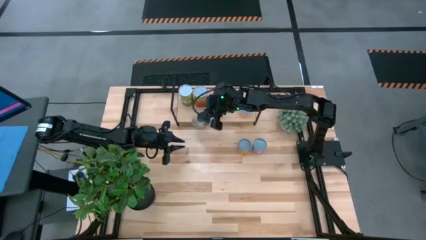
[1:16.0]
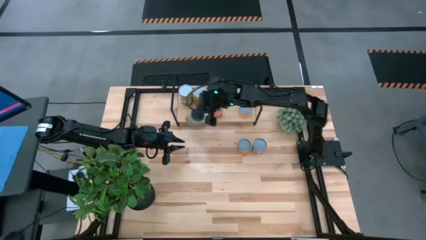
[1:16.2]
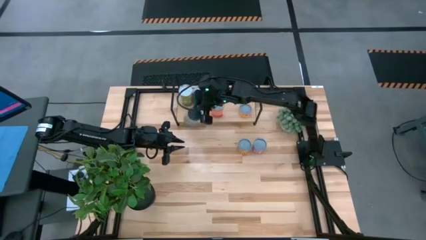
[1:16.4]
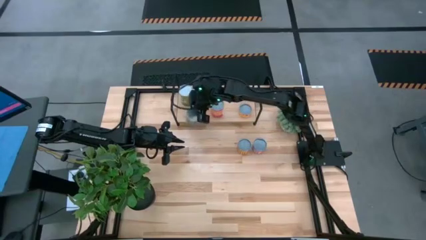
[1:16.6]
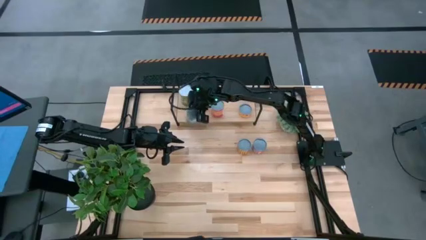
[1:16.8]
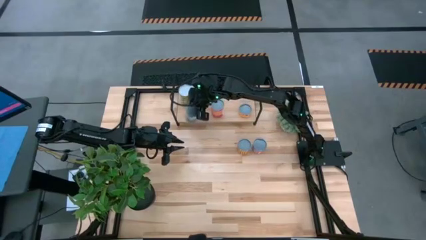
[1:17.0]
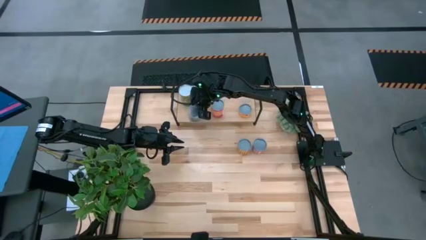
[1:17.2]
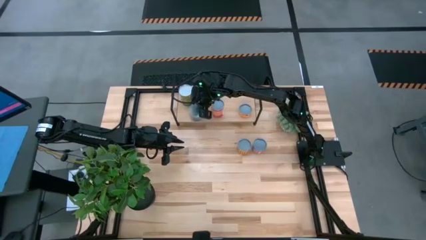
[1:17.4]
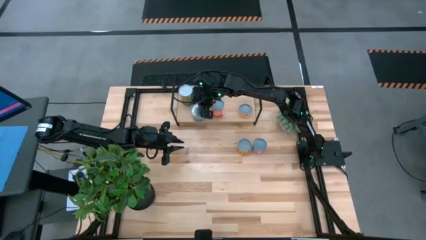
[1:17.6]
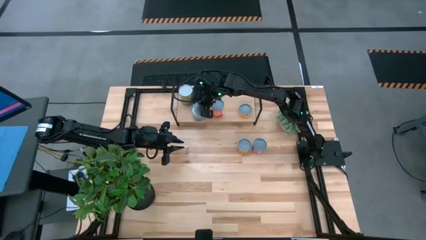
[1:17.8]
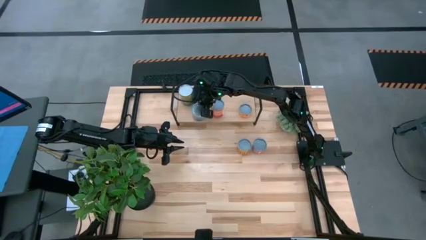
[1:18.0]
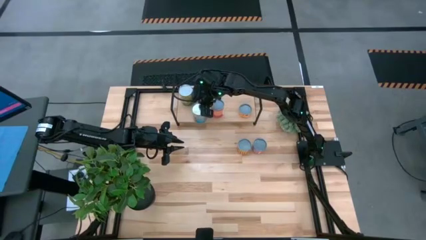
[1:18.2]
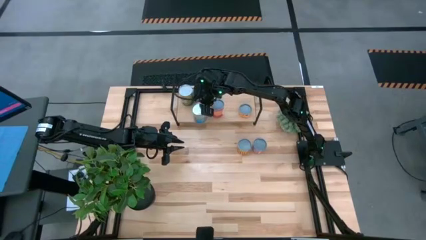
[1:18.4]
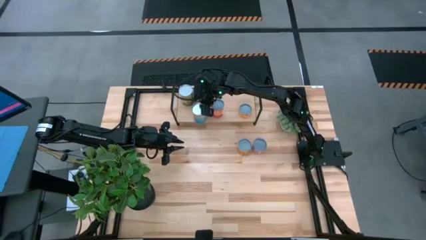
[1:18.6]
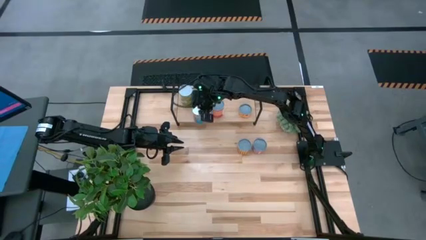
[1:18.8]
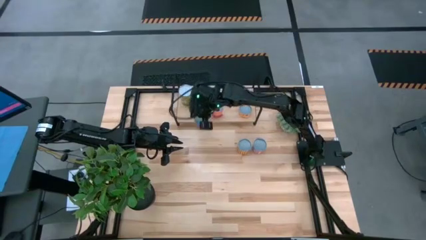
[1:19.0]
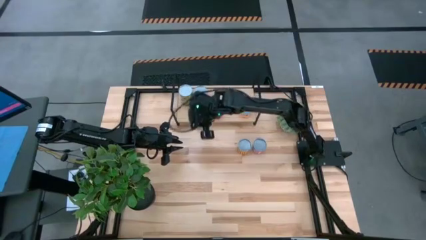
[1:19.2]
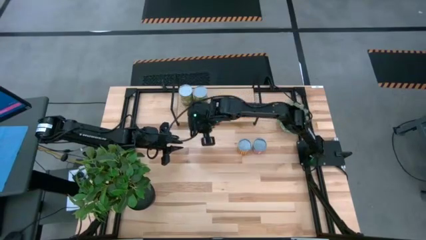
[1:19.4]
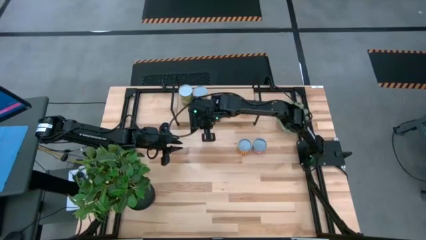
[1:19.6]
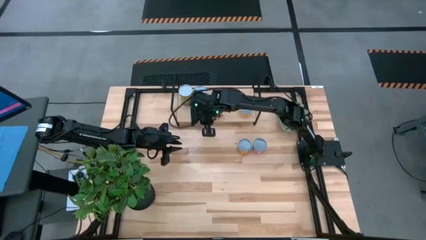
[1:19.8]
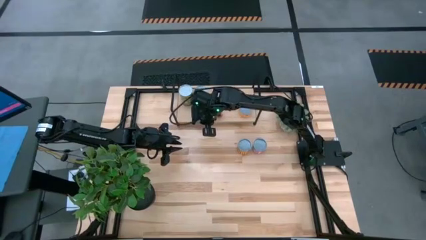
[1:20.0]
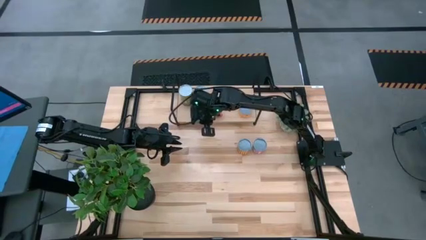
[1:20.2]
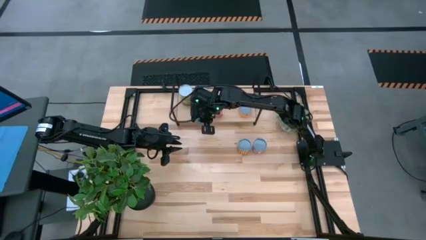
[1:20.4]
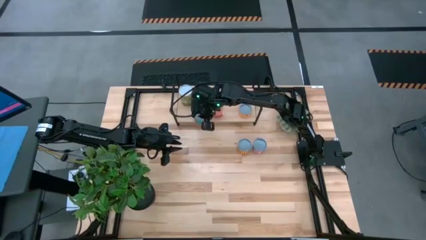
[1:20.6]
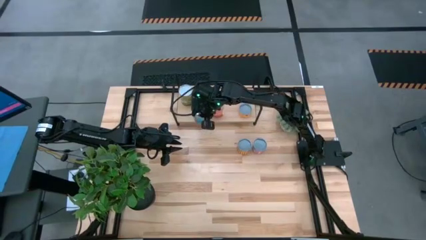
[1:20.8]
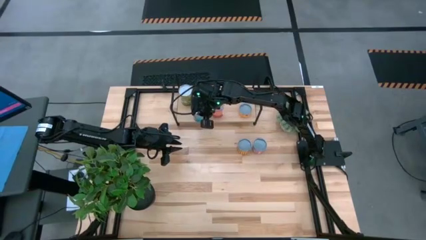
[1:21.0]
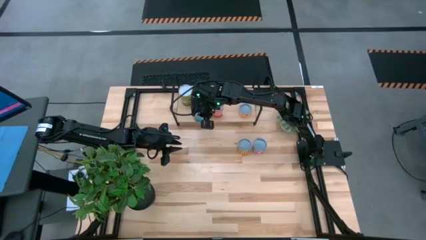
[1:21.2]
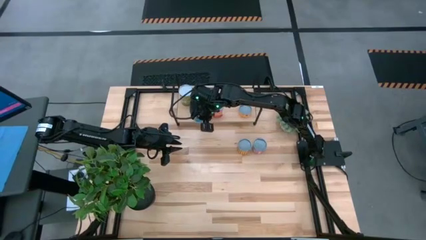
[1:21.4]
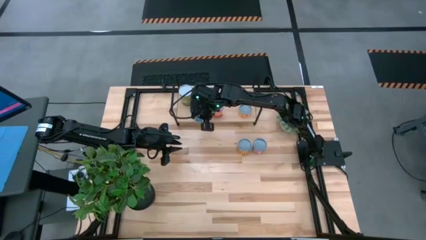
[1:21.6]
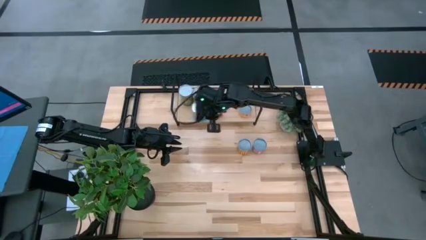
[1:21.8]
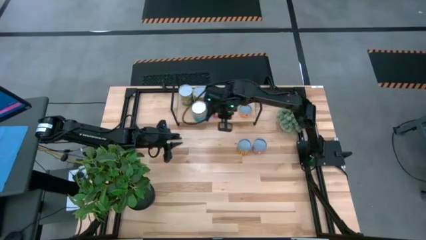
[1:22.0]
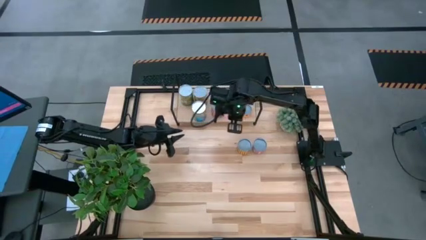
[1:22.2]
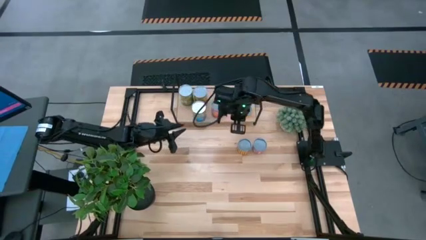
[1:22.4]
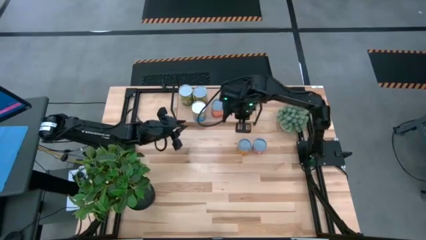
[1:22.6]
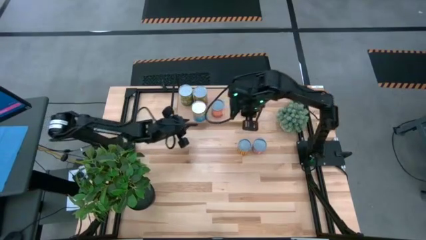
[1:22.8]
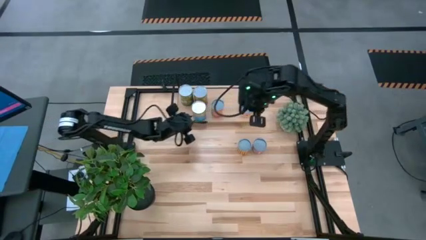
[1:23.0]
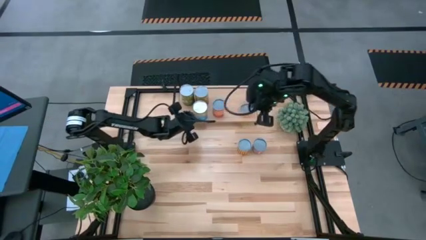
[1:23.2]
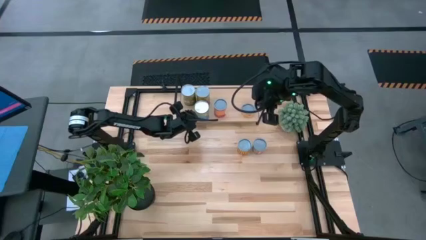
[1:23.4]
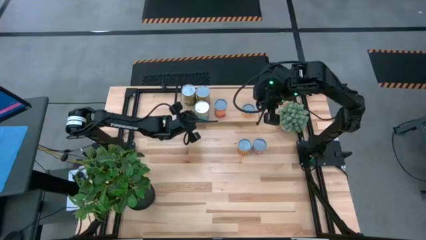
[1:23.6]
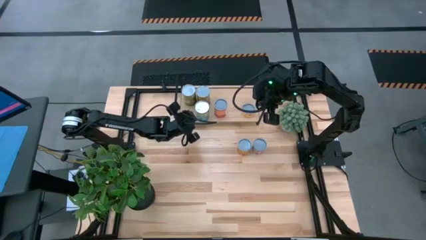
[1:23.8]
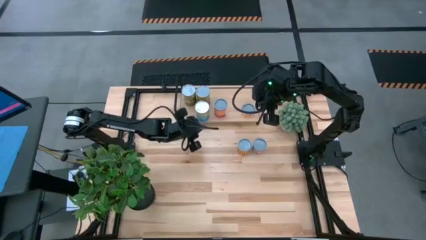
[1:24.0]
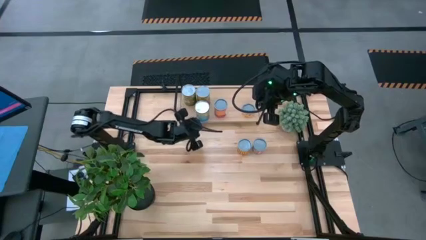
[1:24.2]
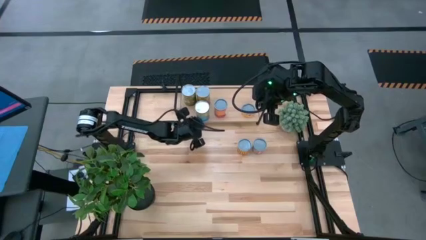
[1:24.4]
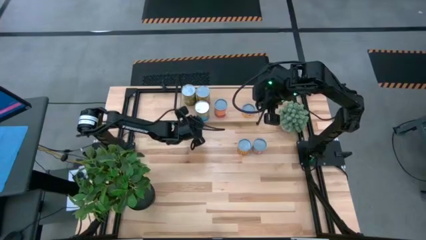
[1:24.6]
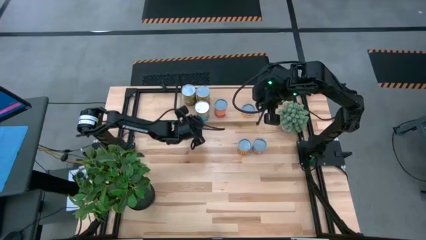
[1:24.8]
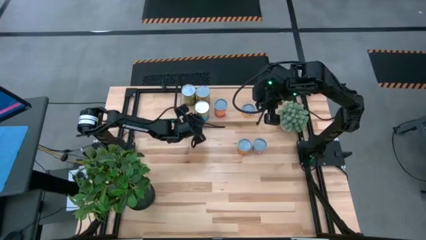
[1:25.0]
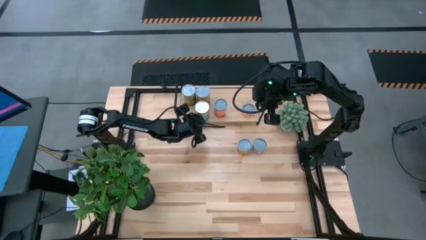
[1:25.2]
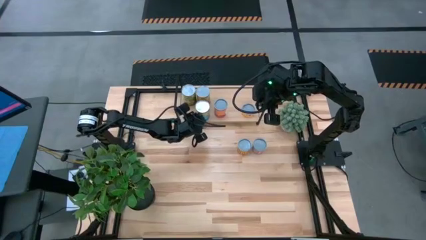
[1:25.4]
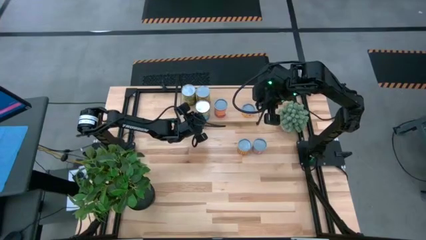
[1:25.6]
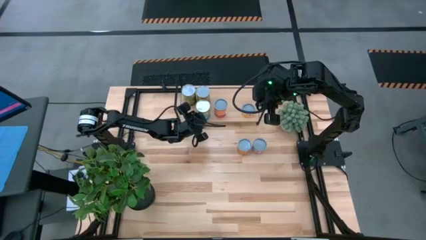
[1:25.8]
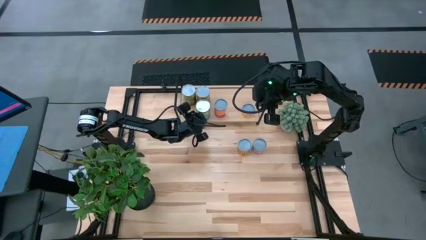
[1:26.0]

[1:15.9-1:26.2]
Task: Pick and place cans onto a shelf
Put the canned tomatoes on the shelf

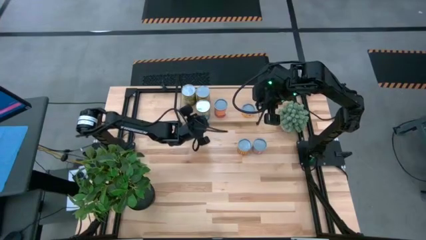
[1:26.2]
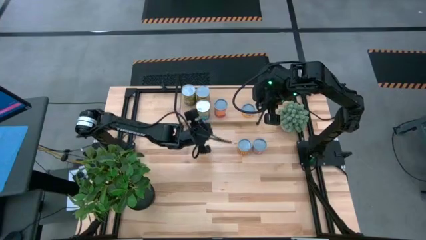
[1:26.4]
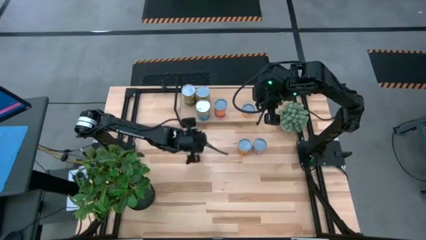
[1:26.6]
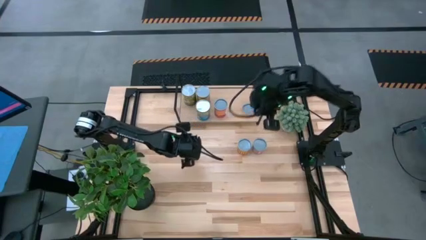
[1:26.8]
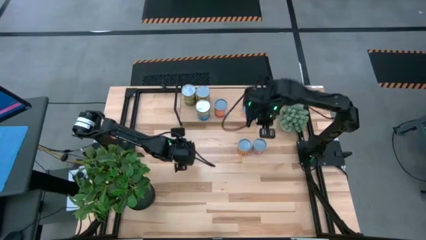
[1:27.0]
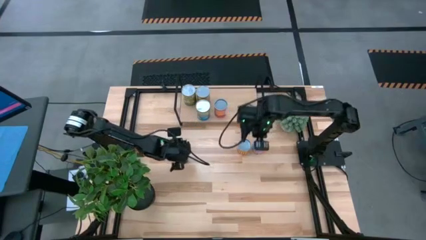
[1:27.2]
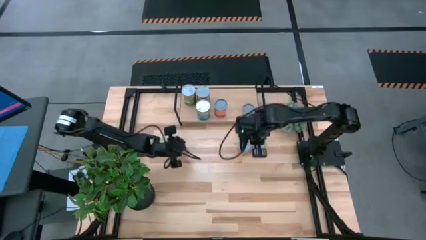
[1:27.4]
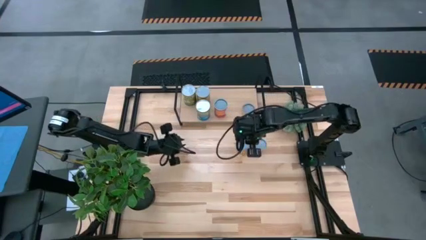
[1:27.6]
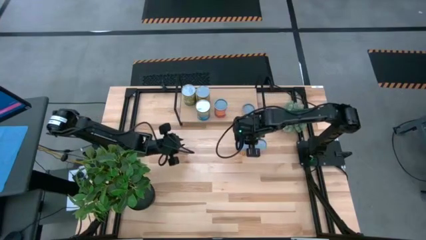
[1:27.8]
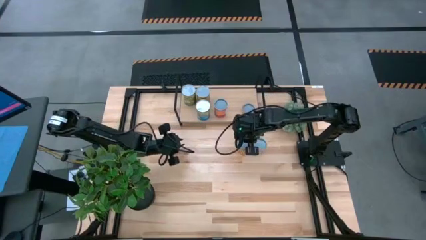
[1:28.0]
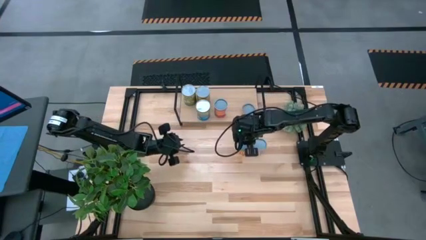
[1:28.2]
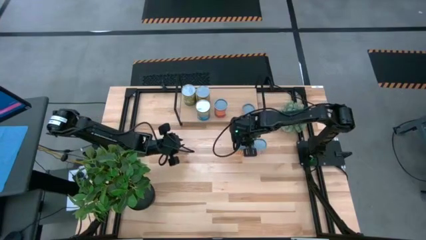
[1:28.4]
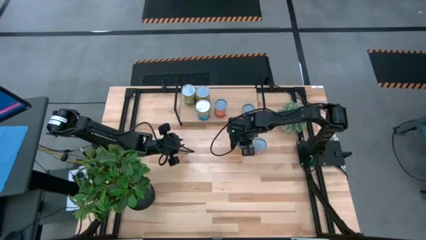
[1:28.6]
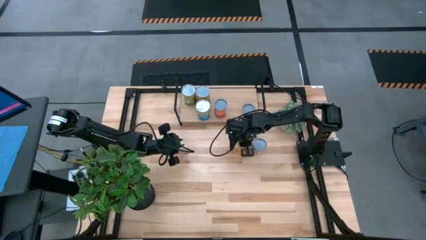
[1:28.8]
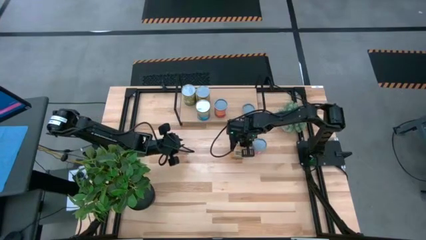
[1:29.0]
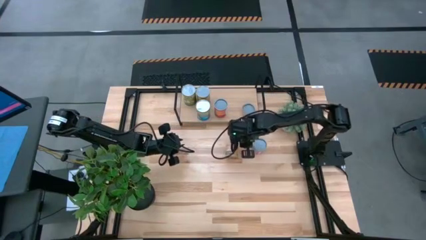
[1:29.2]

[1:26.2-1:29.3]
Put the canned black beans on the shelf
